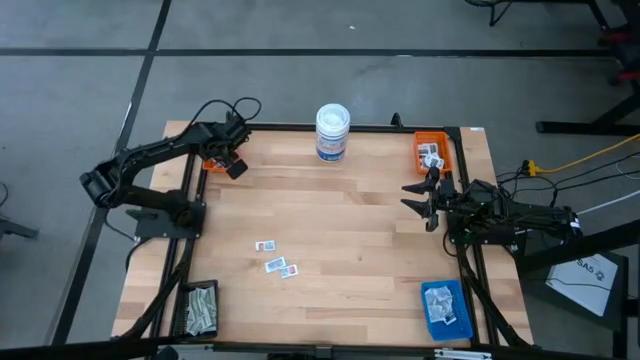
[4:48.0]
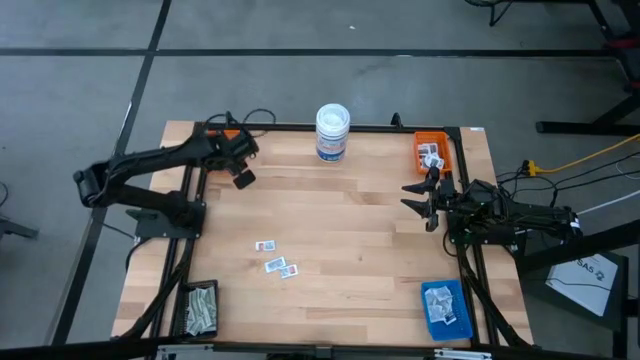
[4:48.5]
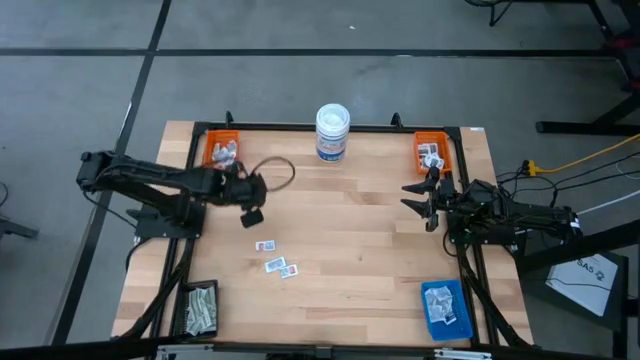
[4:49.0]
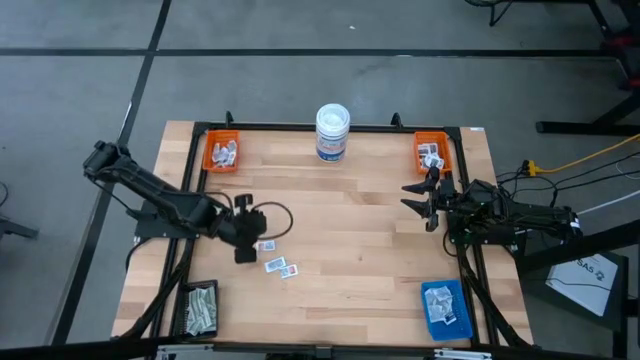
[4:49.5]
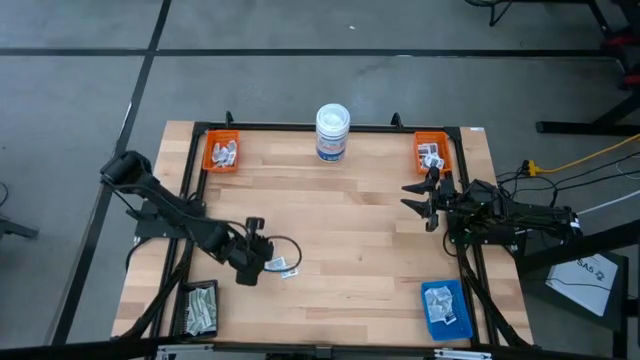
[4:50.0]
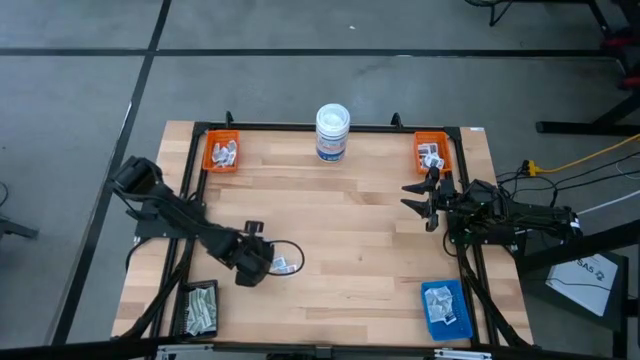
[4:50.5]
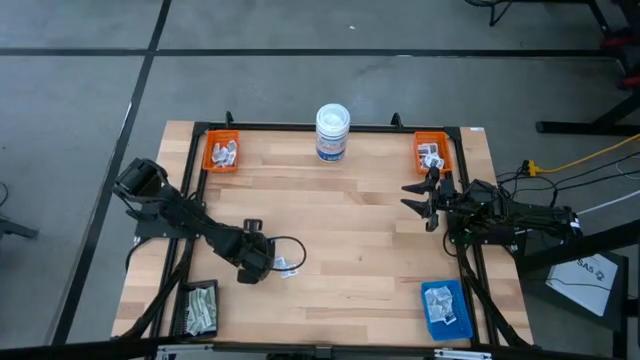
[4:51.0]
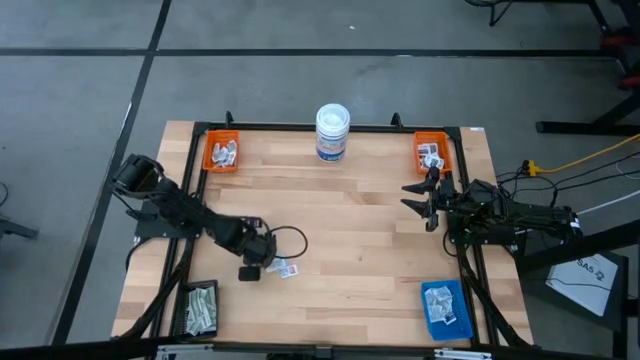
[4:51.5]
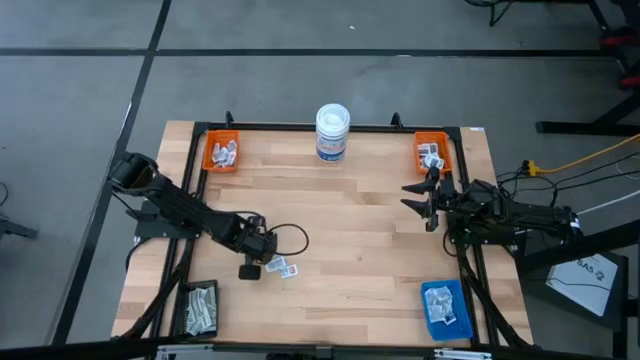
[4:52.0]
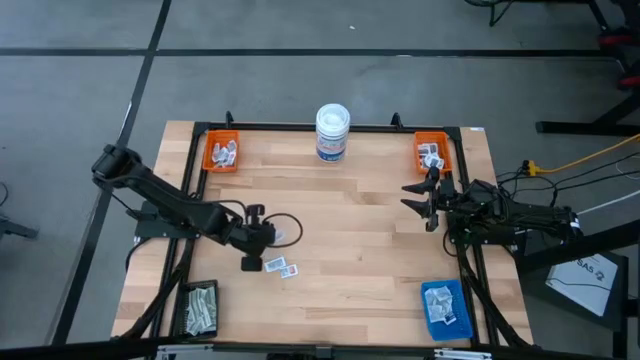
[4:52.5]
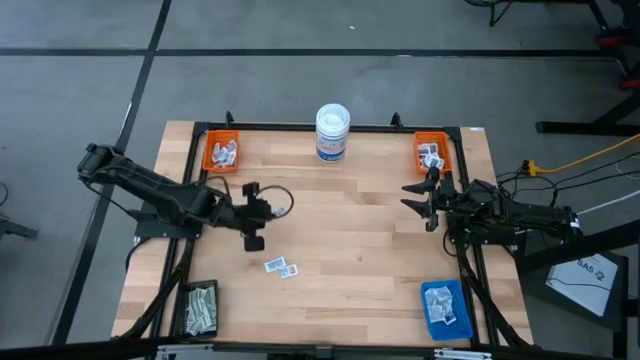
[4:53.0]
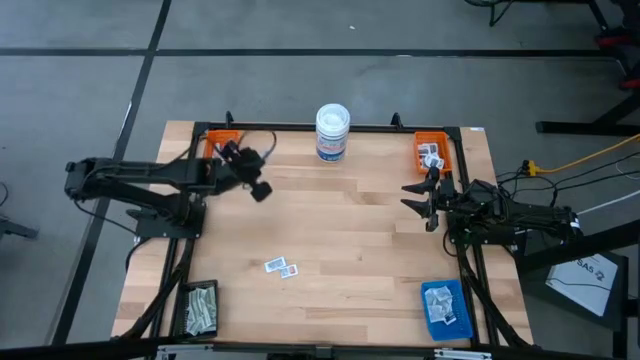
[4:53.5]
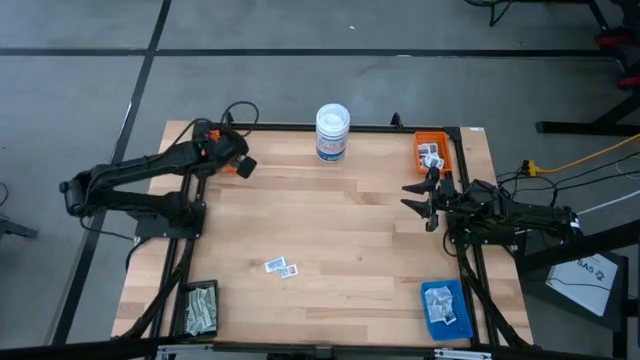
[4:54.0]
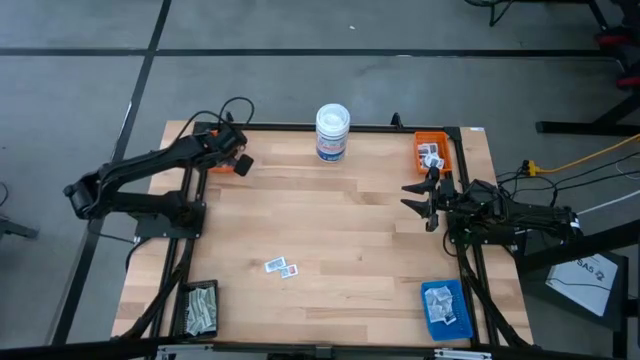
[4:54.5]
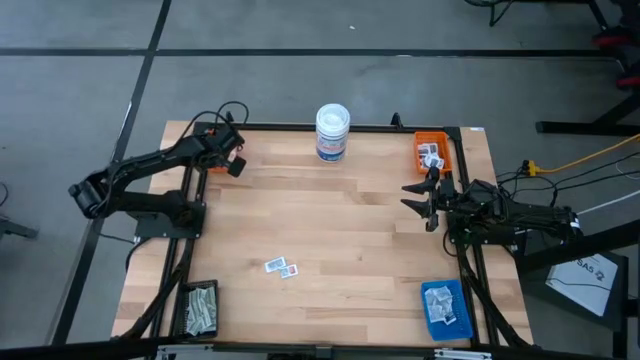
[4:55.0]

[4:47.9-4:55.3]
Task: Pick & Place First Aid Supplies
Put the orange ointment pack into the left orange bin

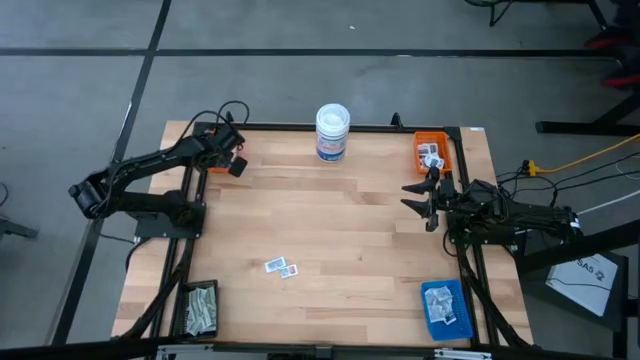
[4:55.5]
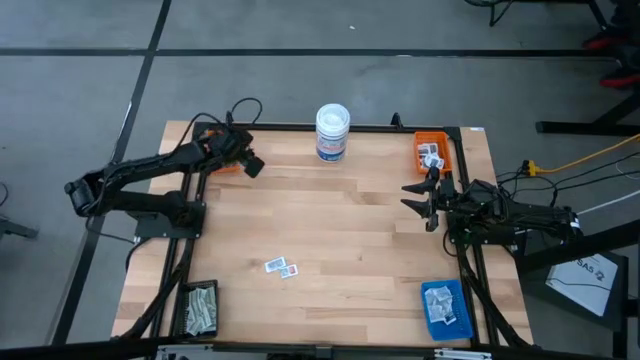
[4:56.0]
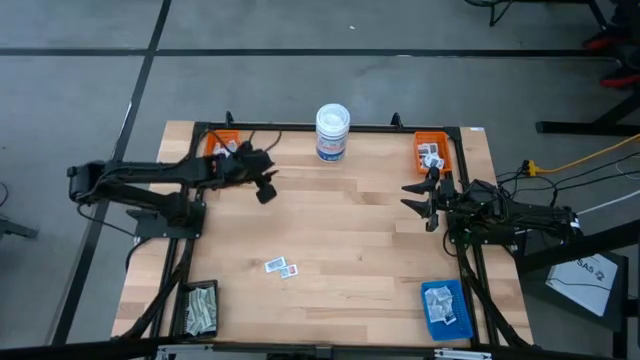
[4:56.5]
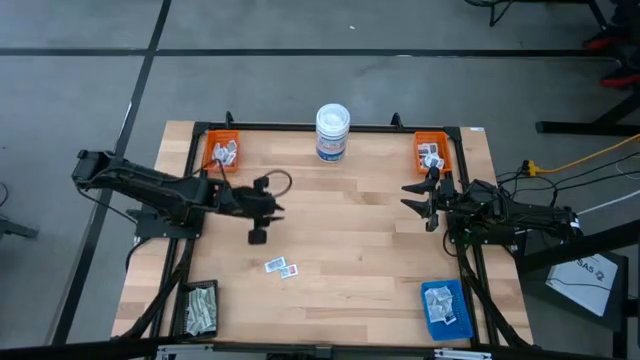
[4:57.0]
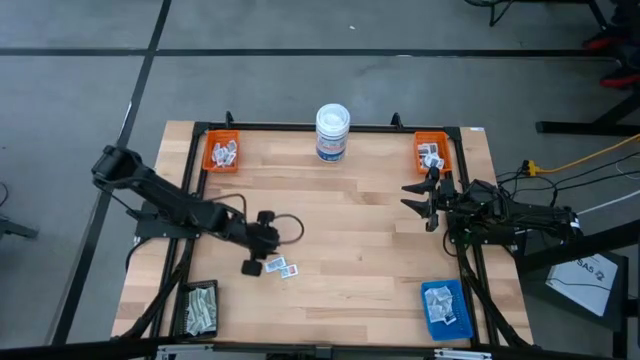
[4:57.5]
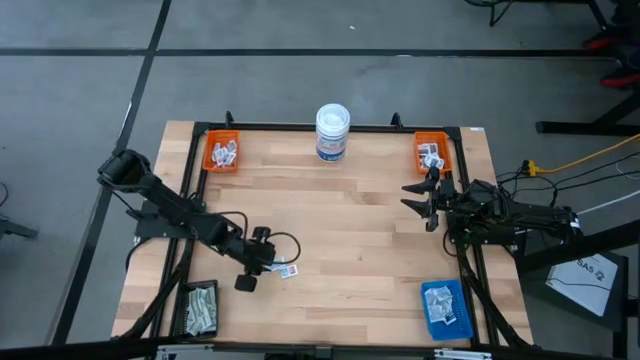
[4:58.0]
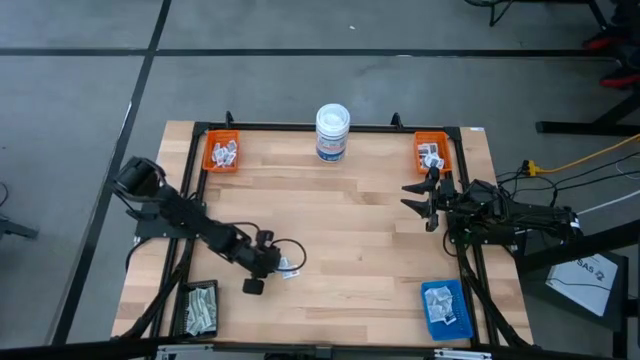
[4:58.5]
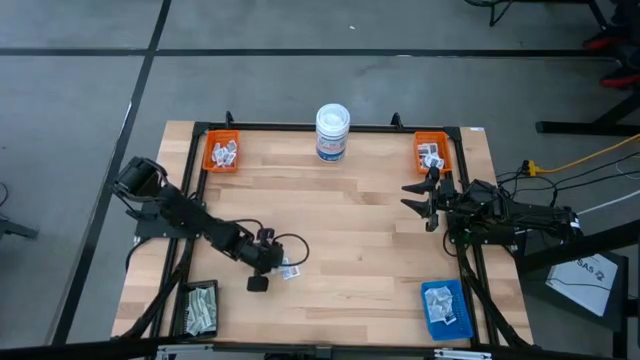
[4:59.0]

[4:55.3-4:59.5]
Put the orange ointment pack into the left orange bin

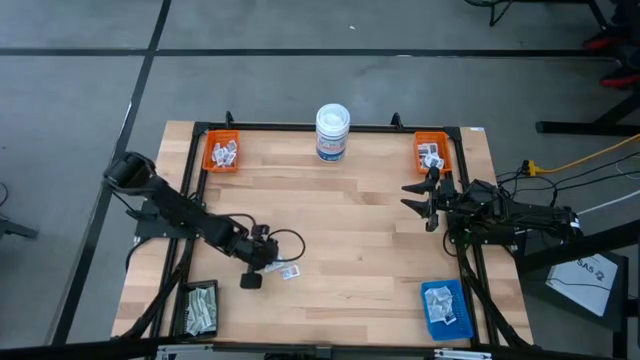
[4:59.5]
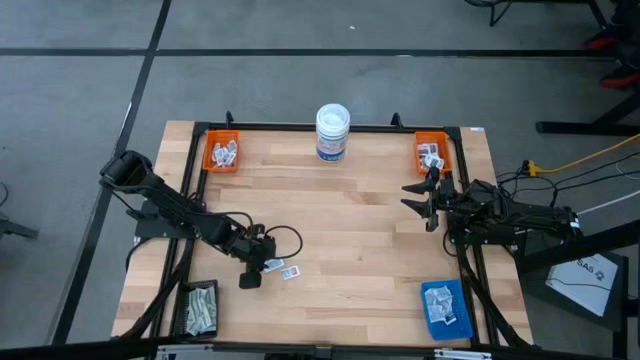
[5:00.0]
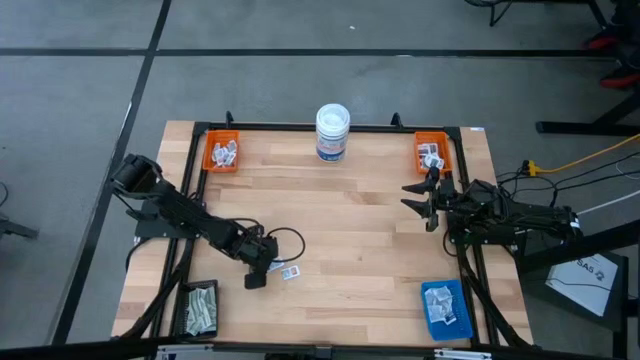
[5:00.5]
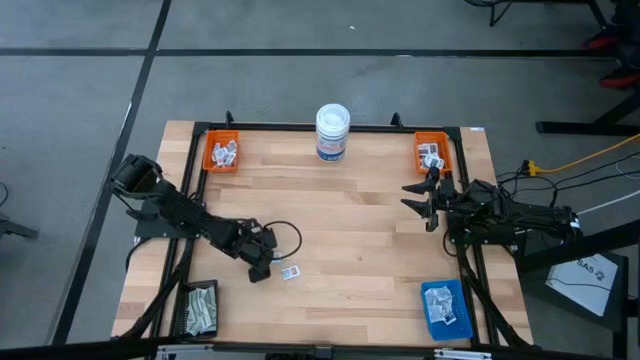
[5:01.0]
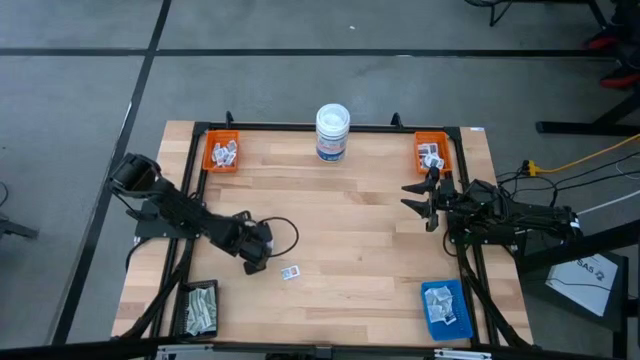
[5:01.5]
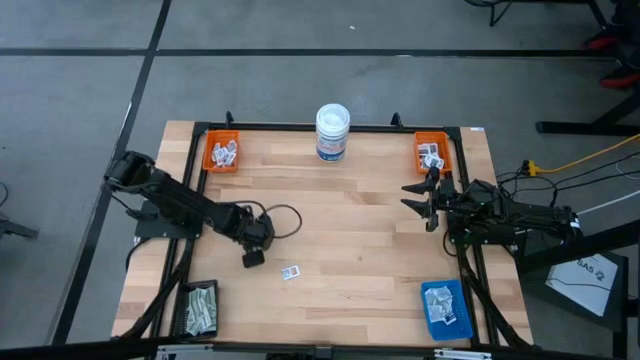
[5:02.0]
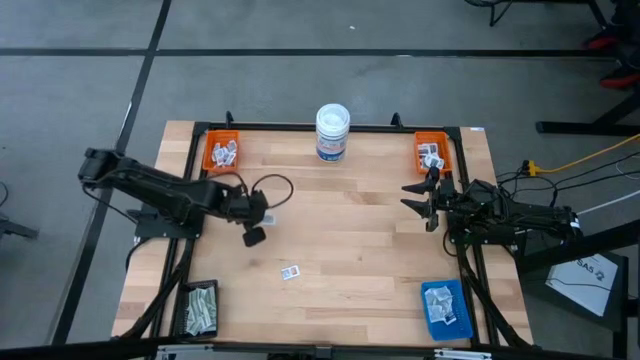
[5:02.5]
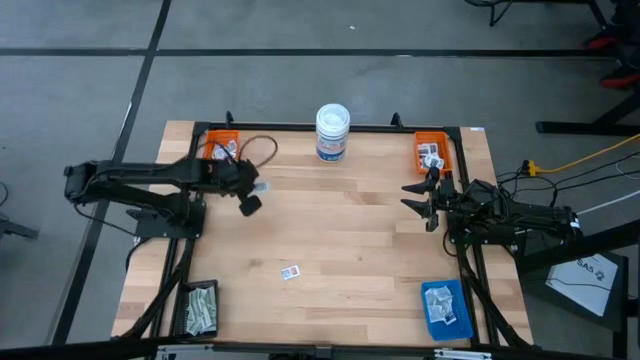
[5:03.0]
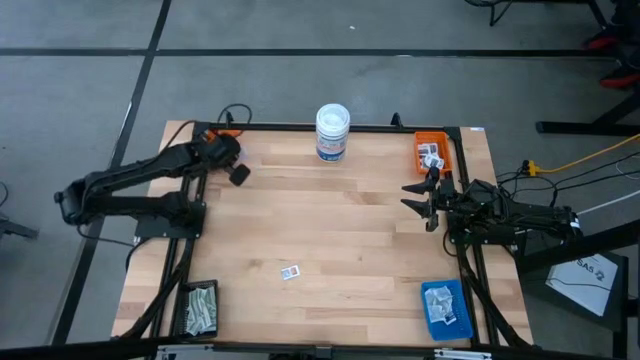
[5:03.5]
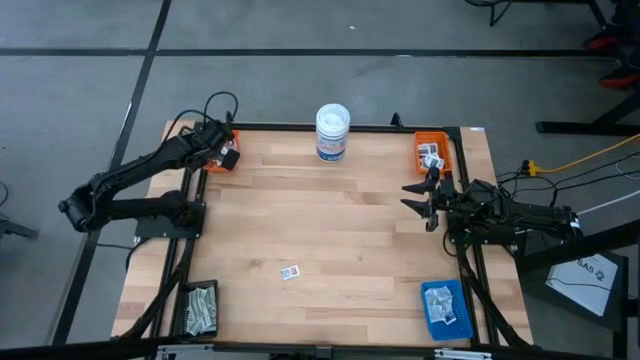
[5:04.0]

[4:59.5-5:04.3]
Put the orange ointment pack into the left orange bin

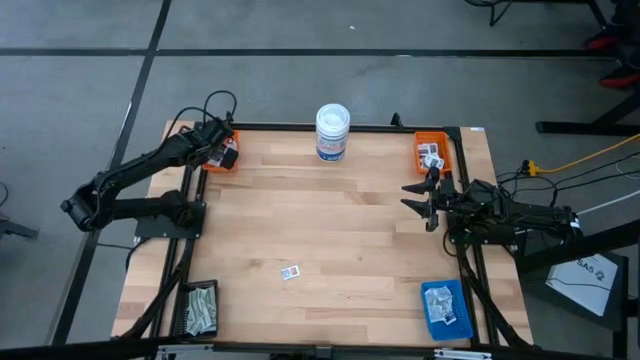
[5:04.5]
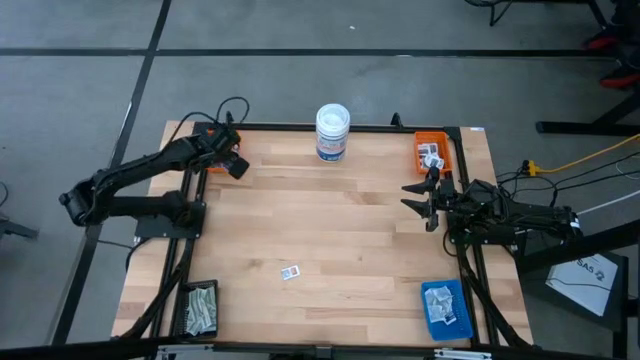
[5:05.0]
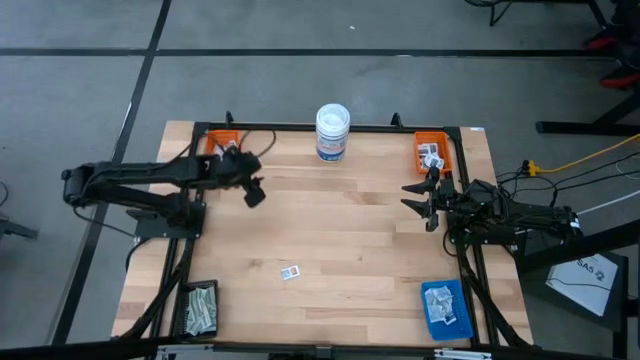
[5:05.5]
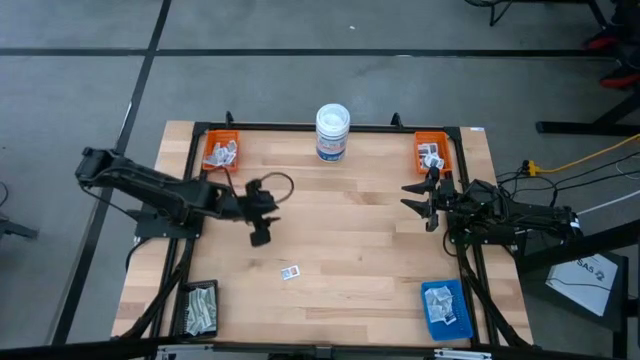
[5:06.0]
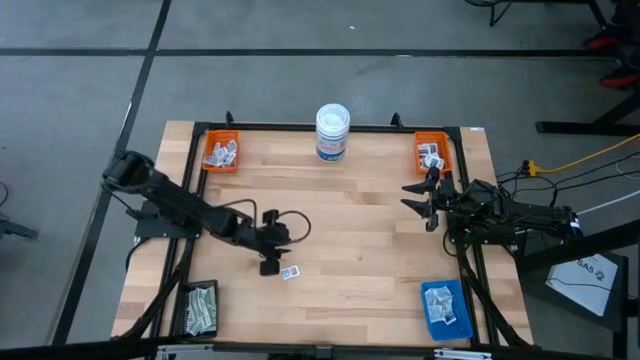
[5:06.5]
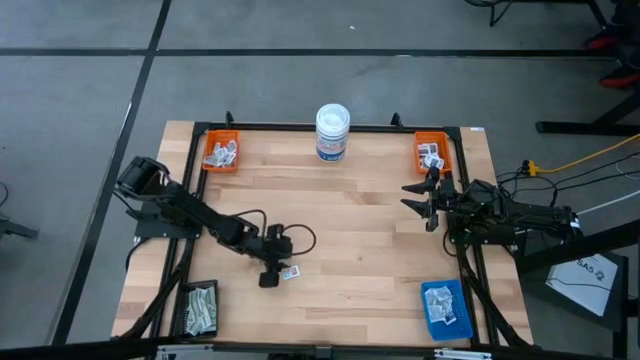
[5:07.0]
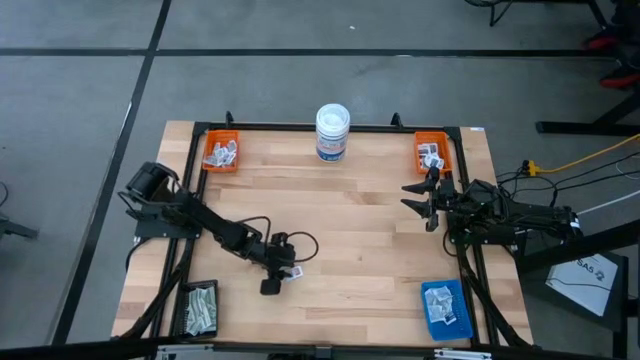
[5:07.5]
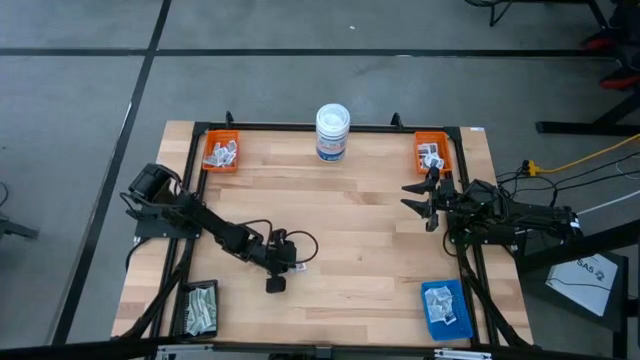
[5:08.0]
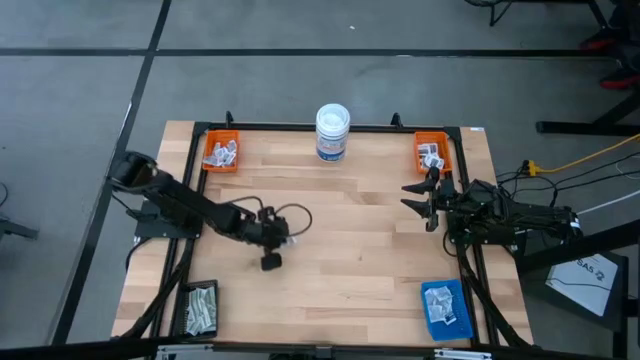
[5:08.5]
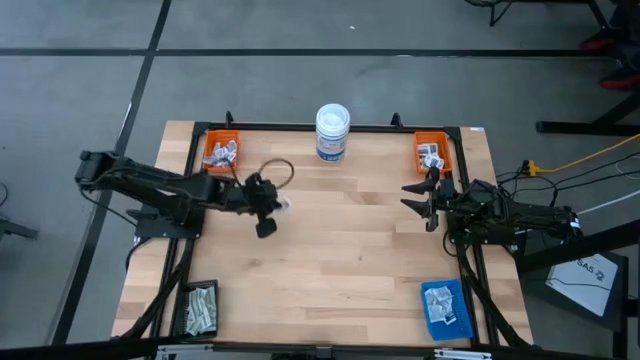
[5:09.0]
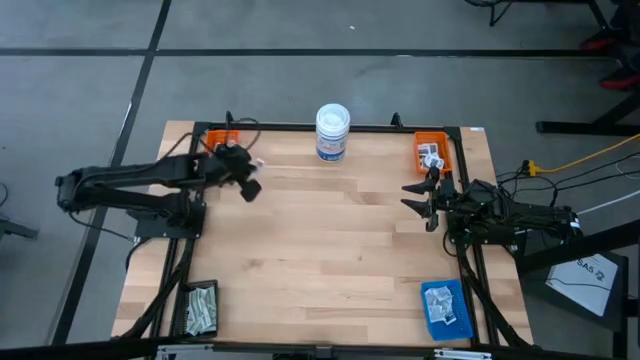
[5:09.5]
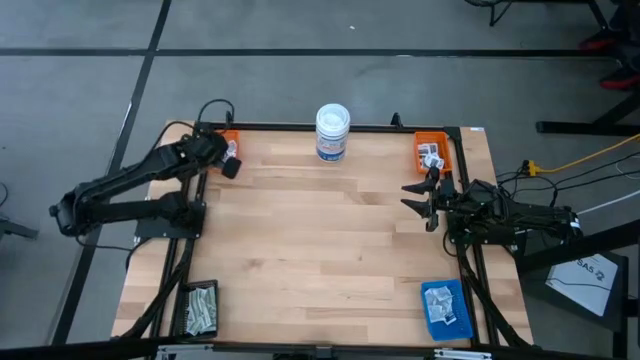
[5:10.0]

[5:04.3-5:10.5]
Put the orange ointment pack into the left orange bin
